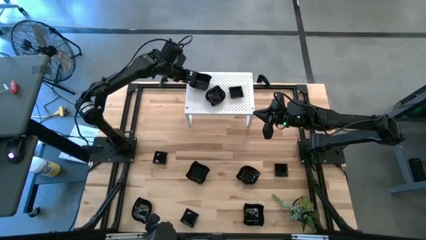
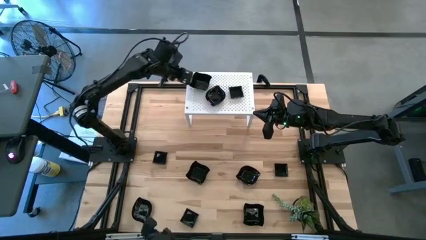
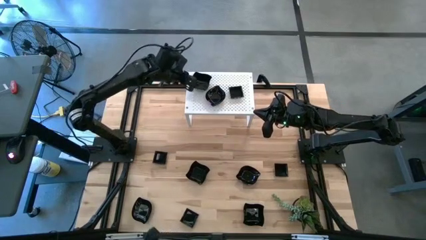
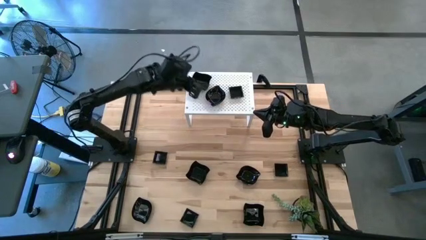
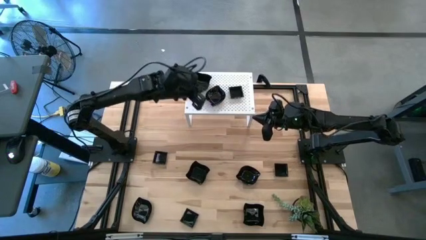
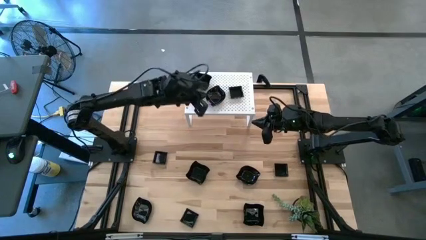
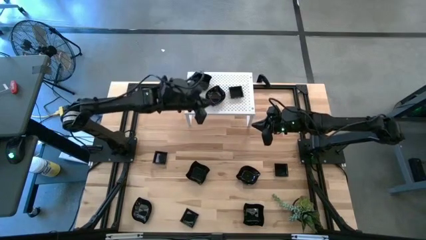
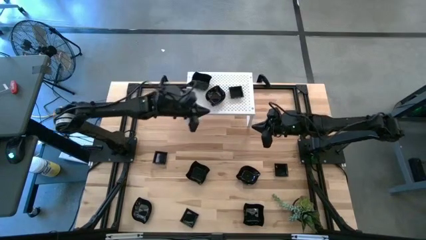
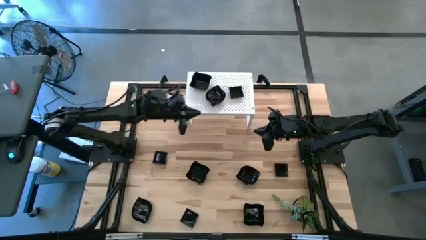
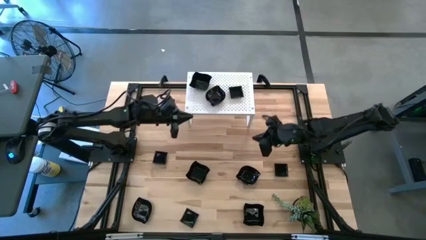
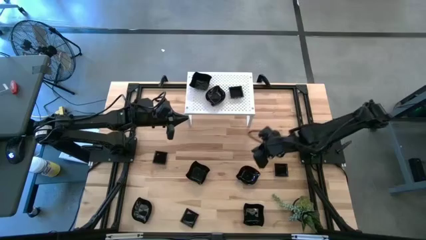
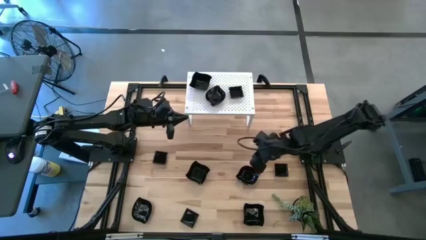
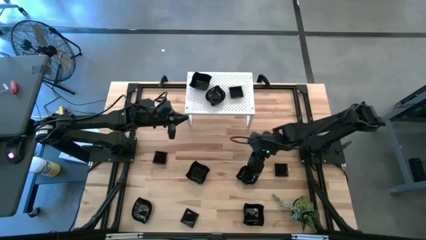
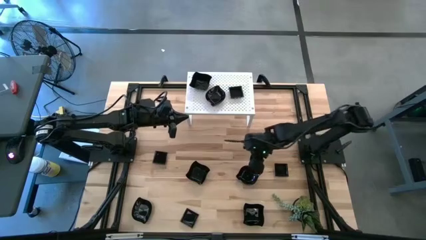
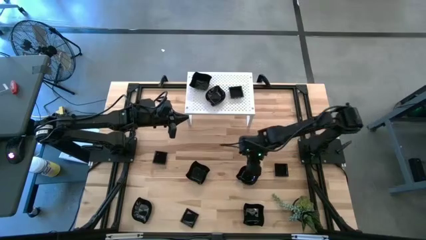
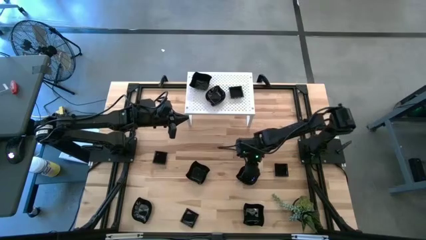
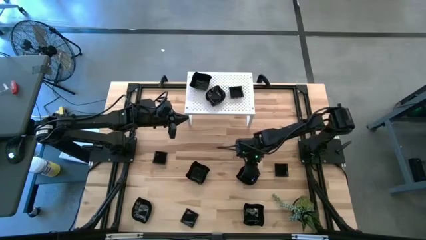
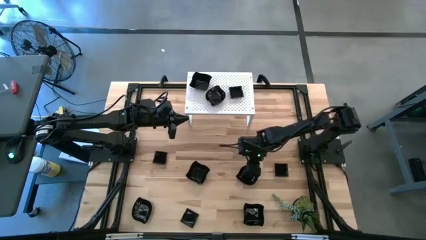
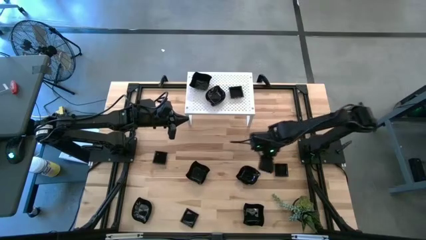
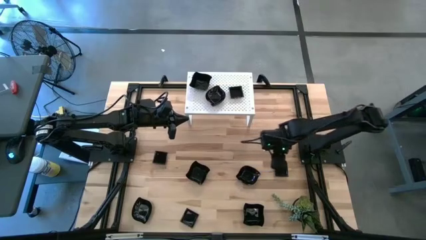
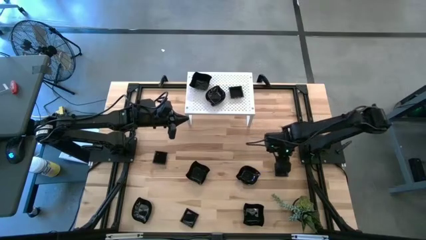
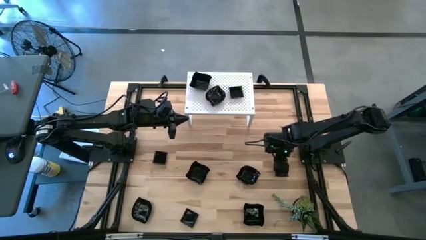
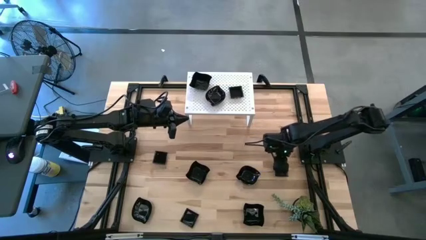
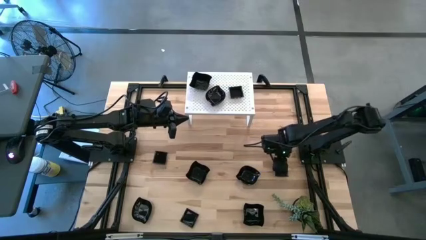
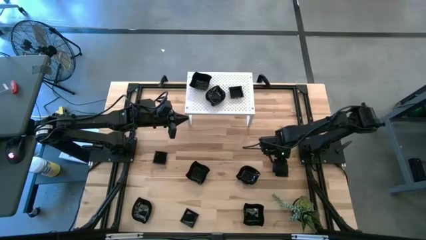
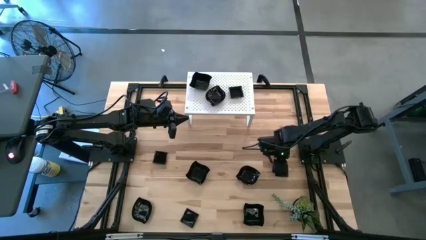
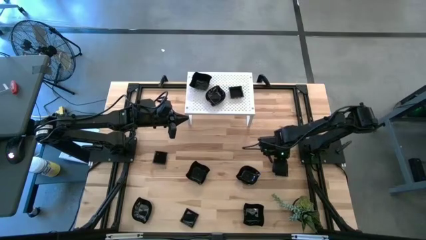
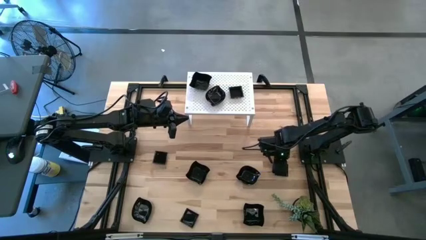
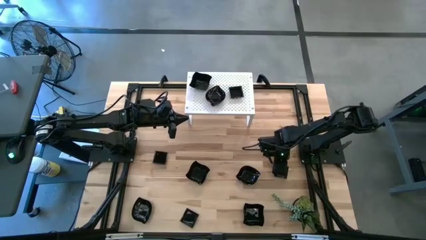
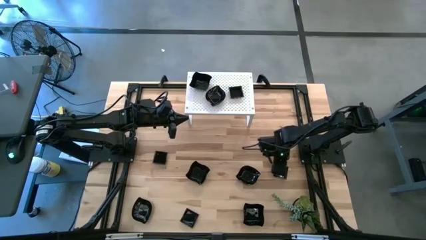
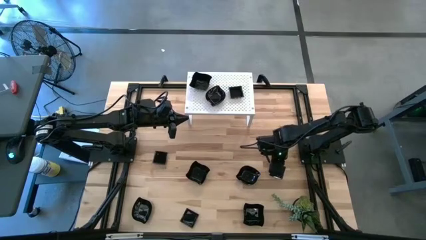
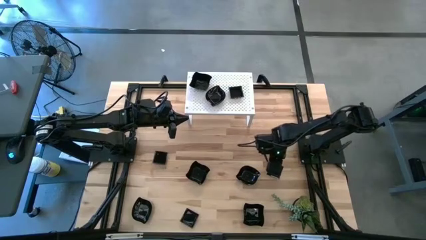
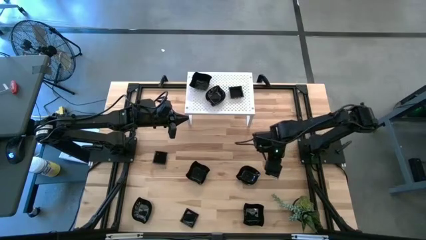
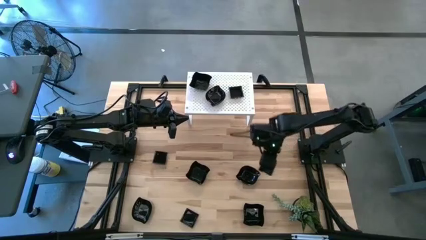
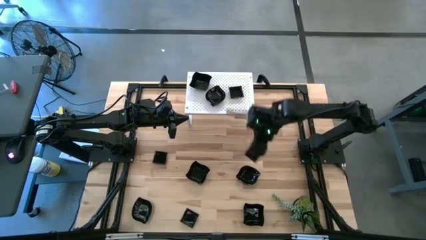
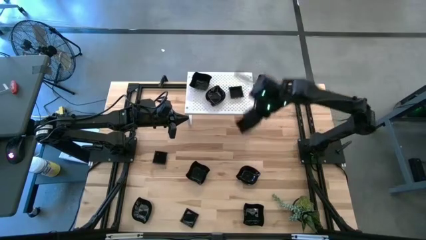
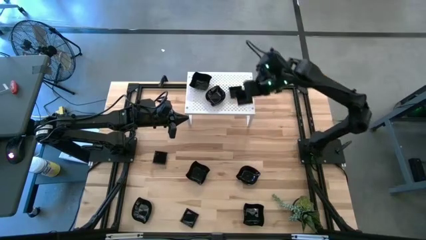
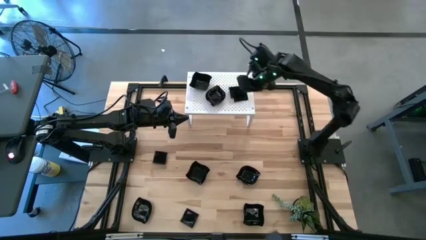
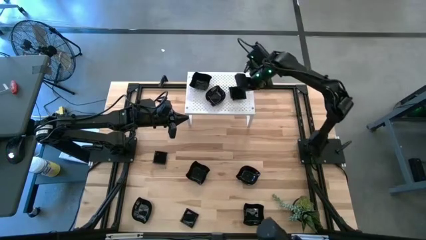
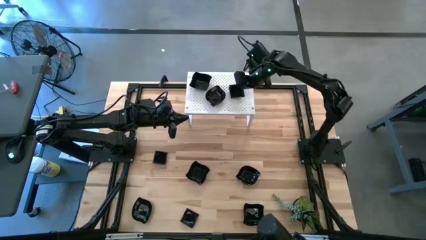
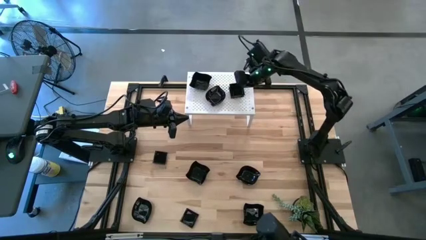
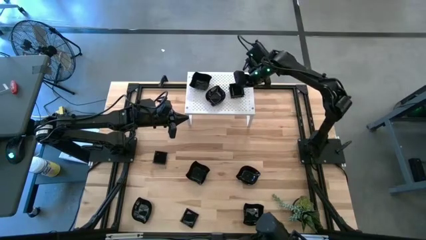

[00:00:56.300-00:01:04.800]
Task: Pick & Place Mini shaped plates
Stack the black square plate on top of the black square plate on the shelf

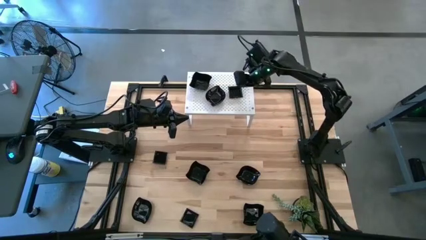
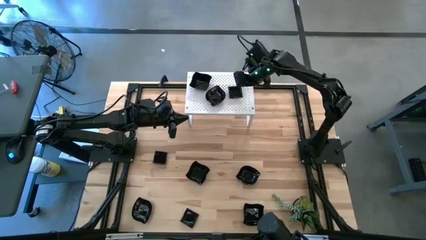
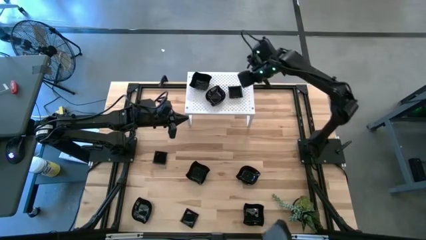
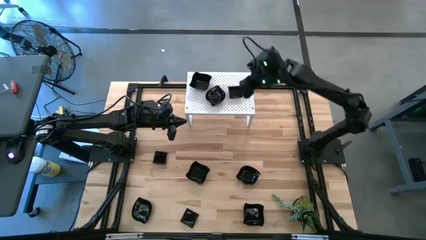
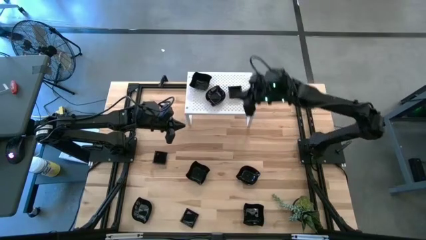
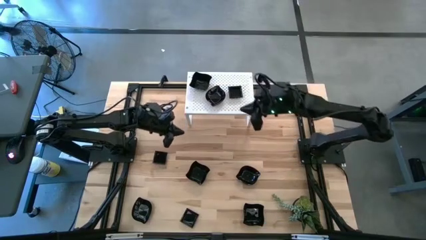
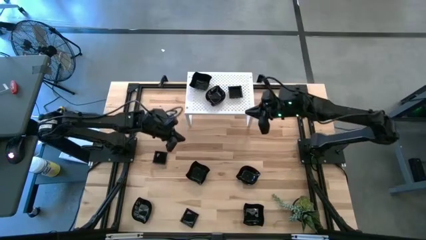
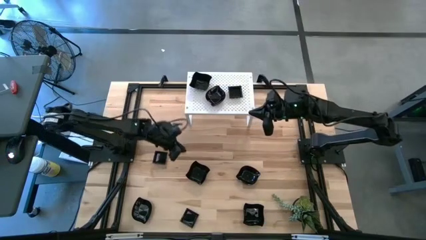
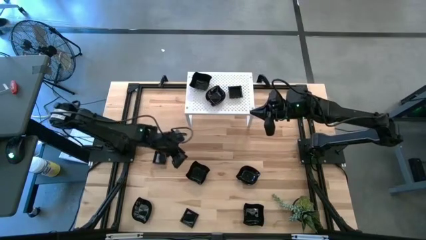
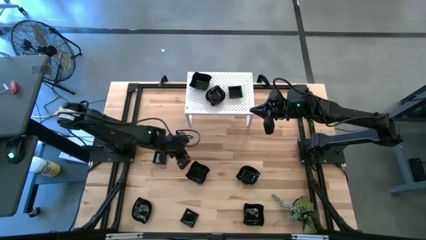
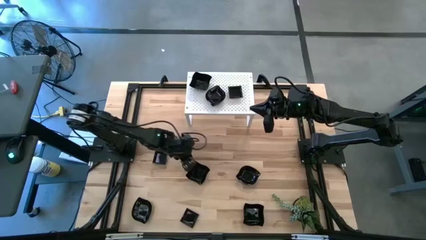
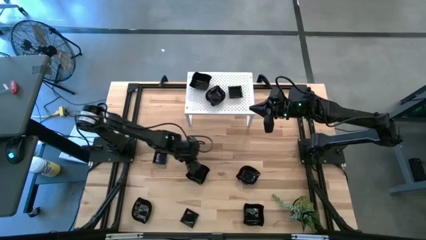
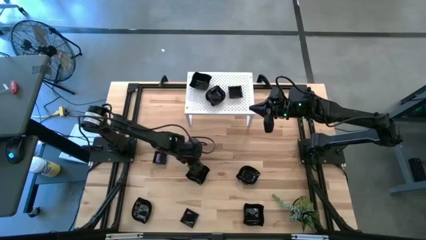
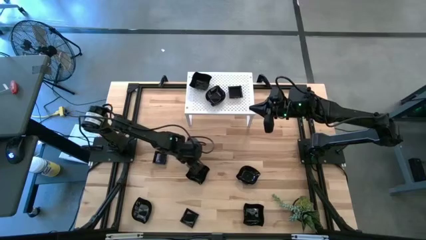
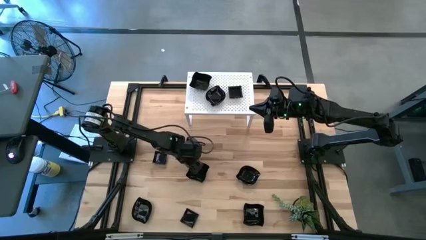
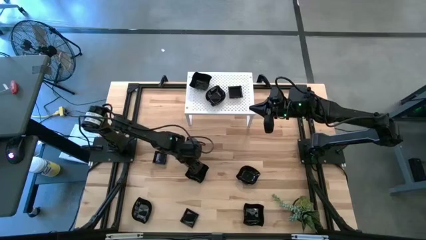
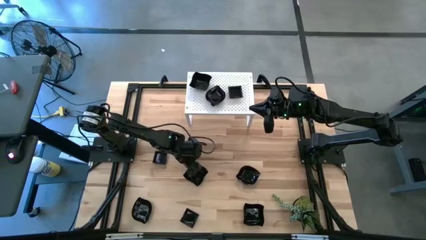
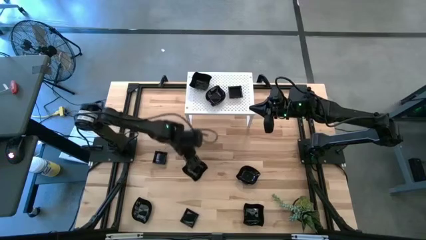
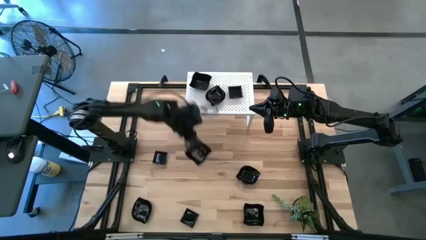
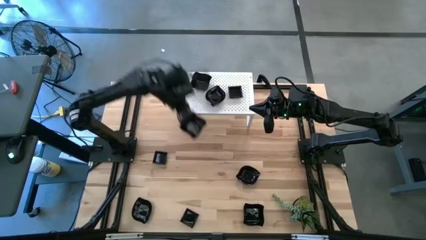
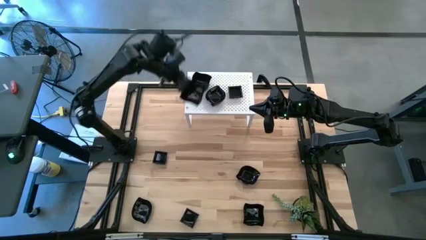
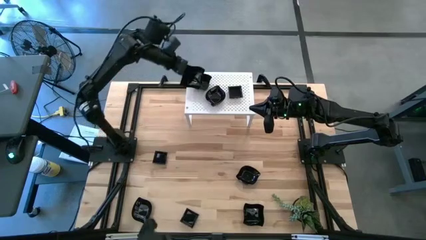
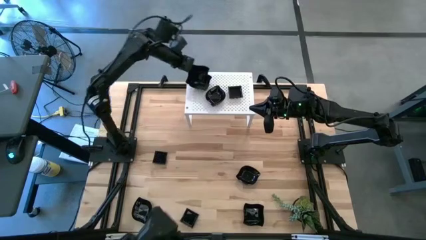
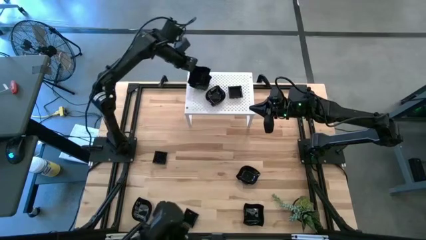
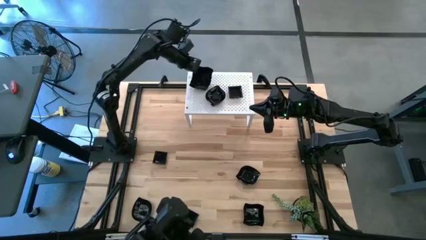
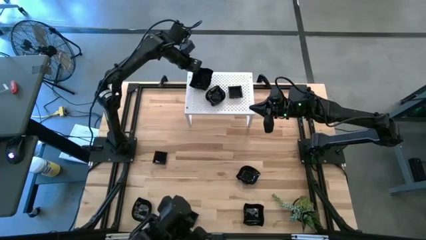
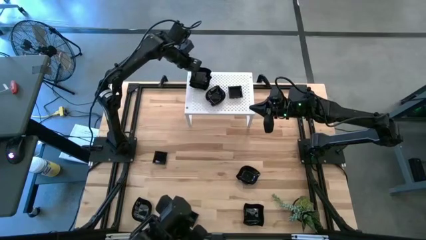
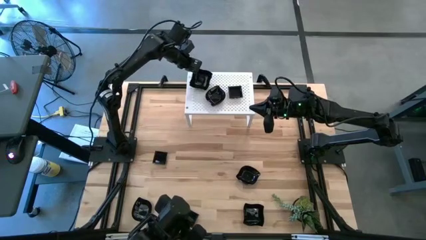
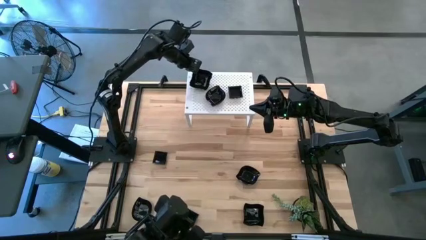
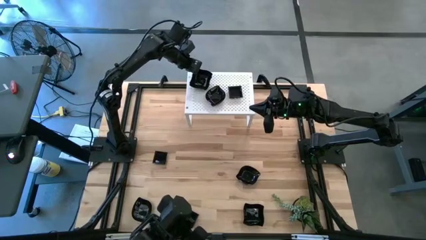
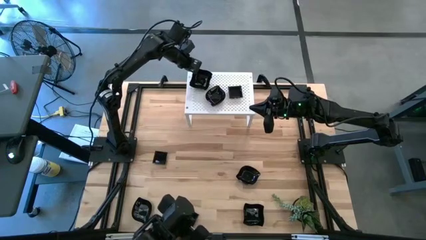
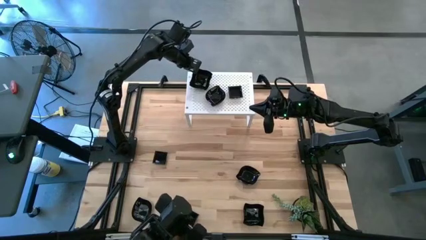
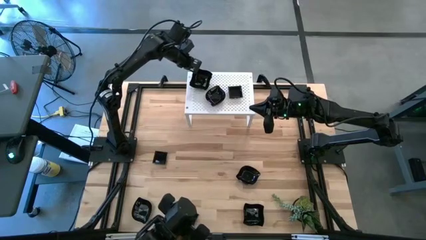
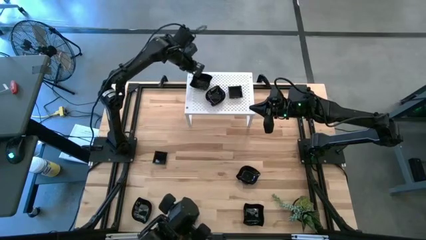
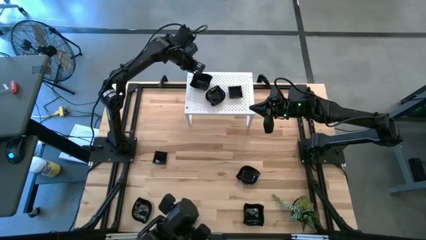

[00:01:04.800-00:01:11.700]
Stack the black distorted square plate on top of the black distorted square plates on the shelf
